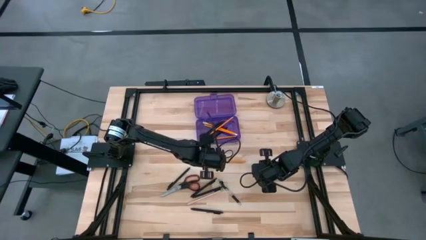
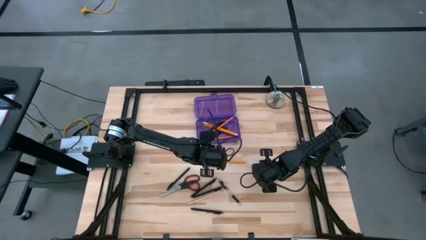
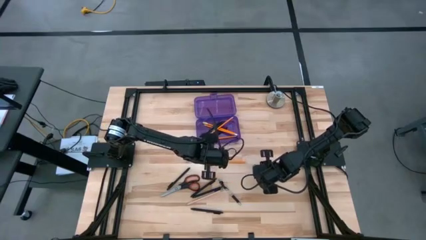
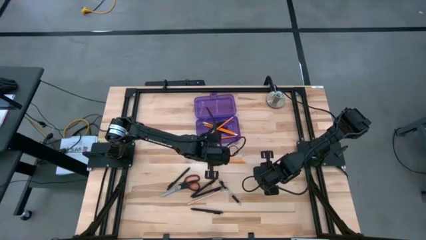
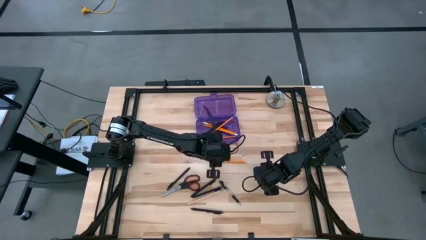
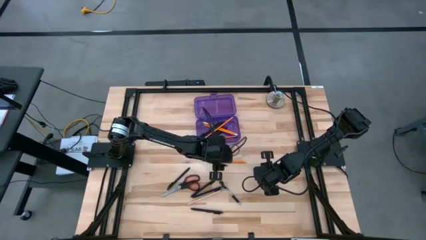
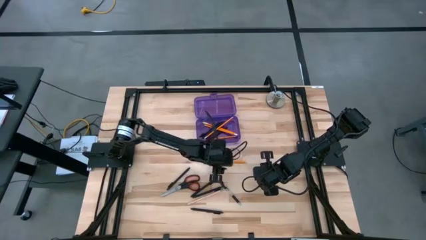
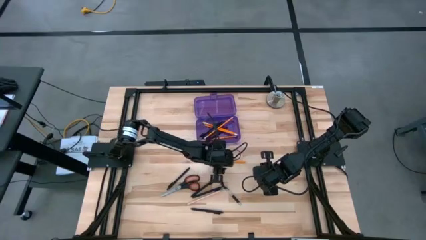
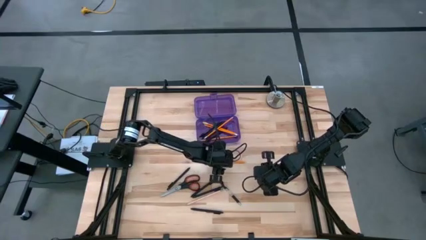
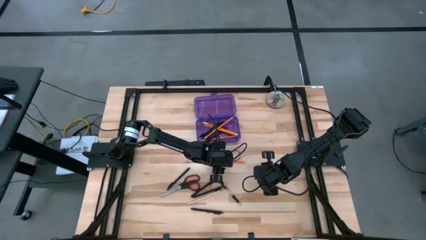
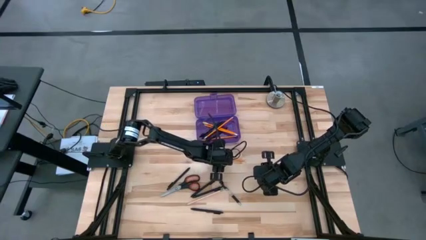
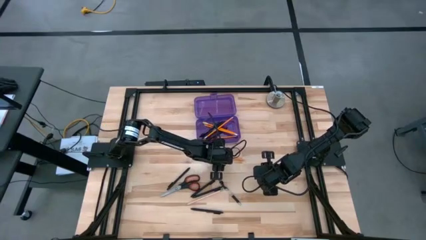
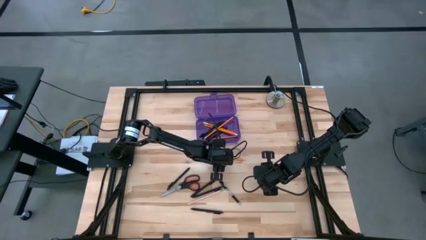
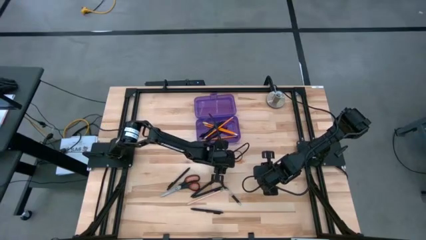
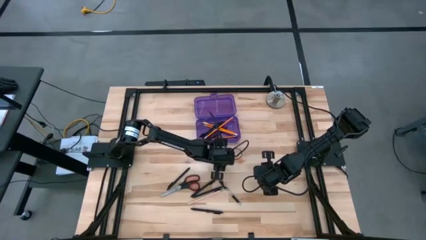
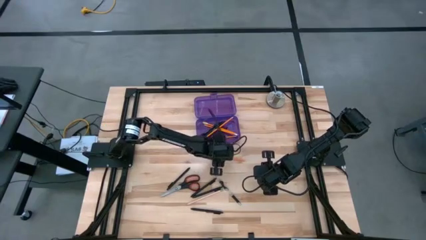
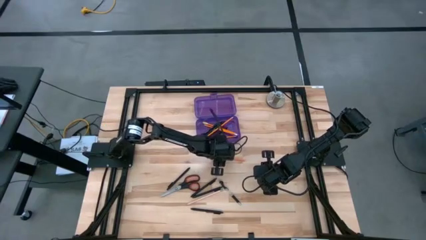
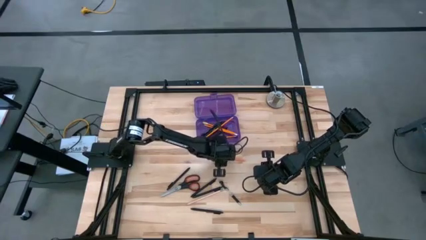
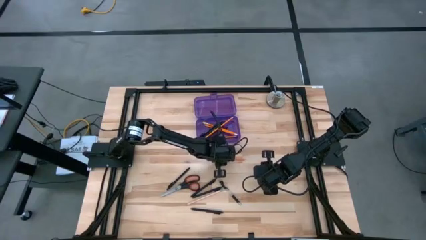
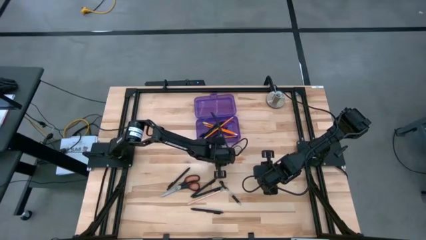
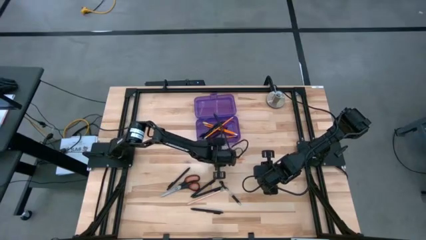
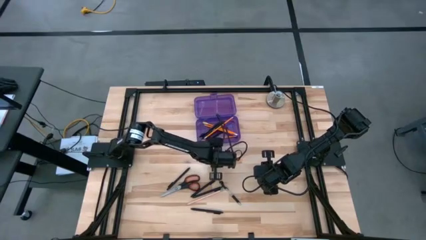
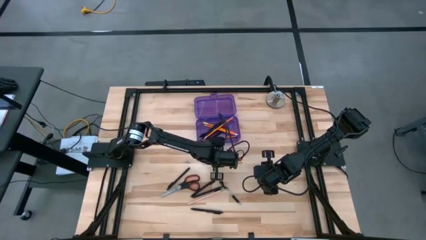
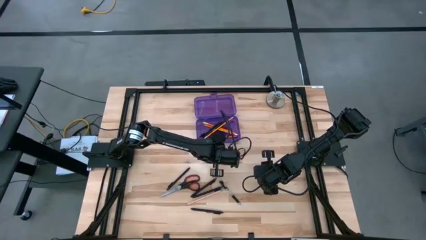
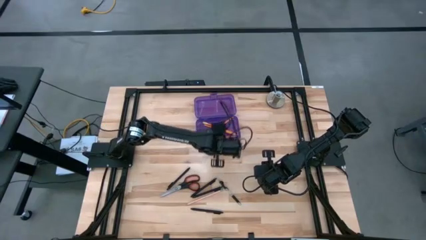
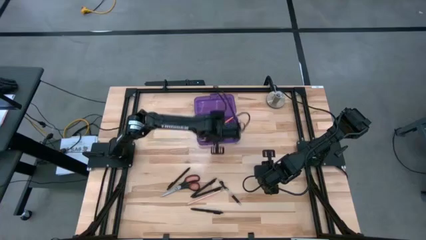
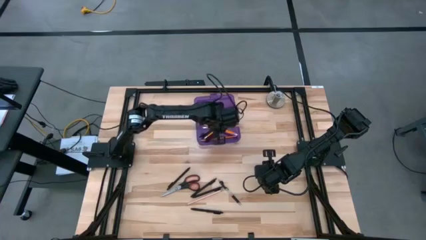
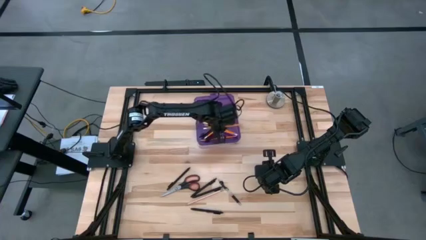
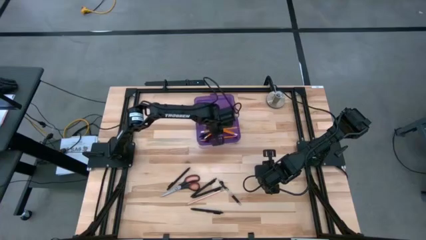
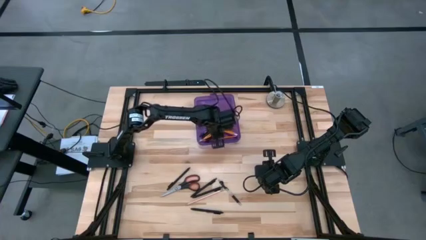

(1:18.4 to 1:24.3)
Task: Pick & place school supplies into a supply box
Put the yellow pencil into the purple supply box

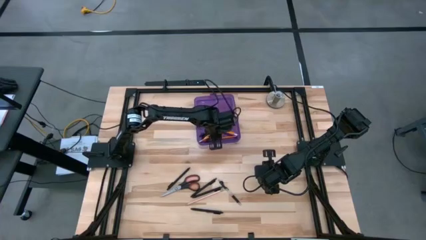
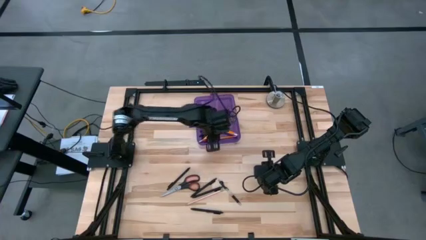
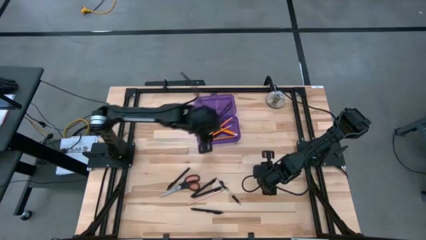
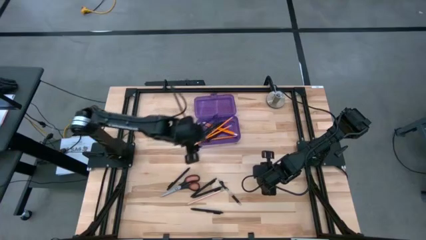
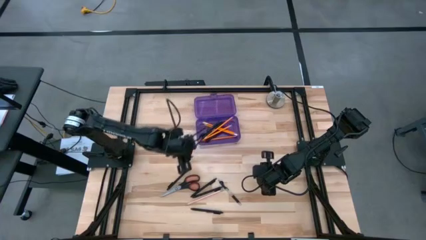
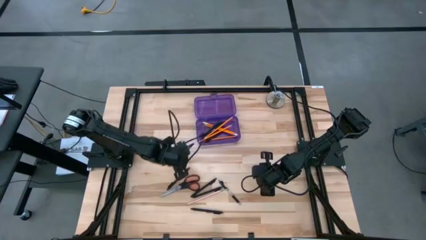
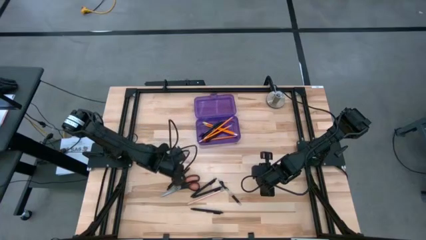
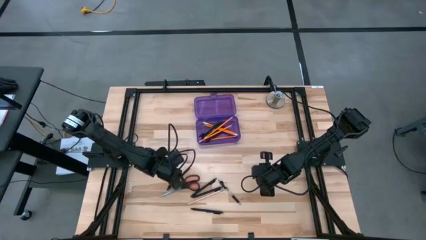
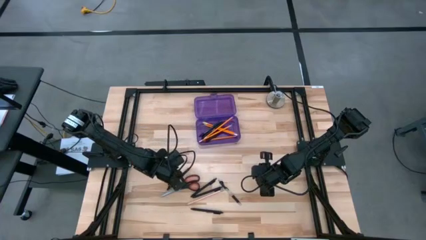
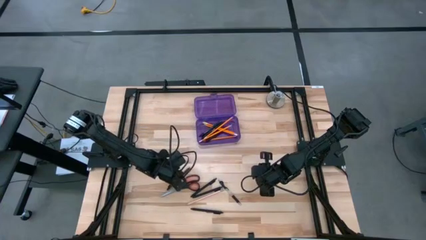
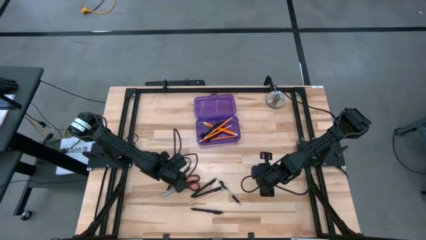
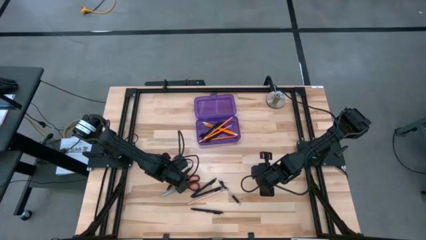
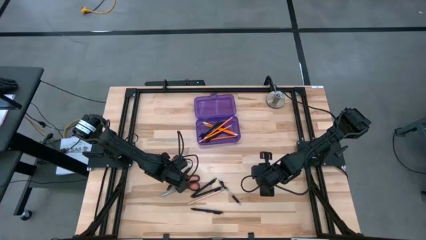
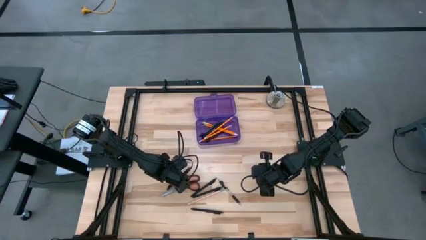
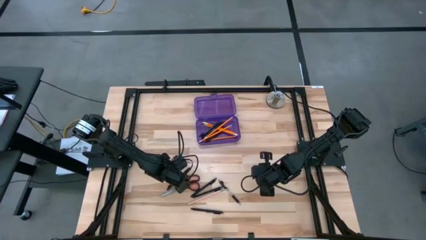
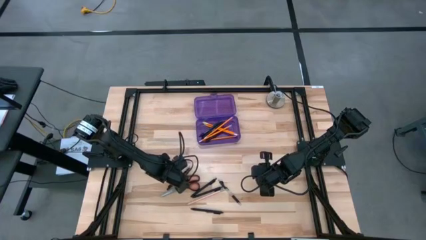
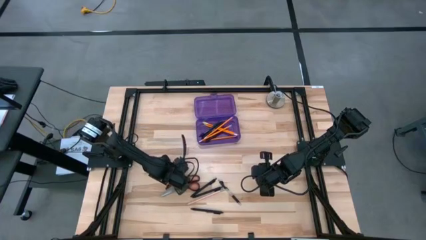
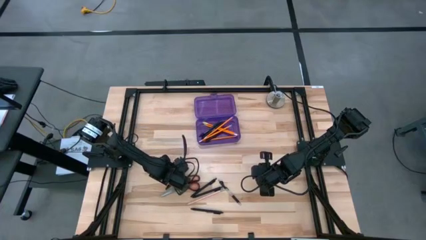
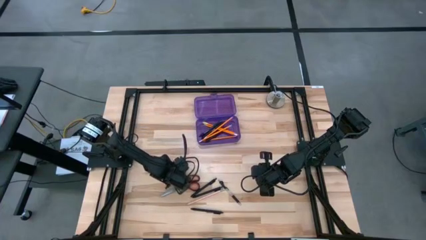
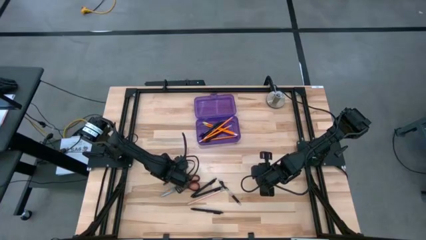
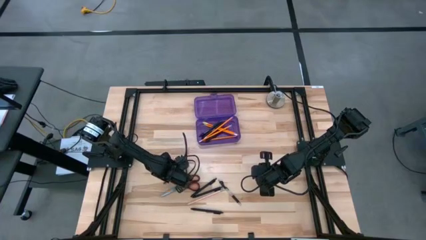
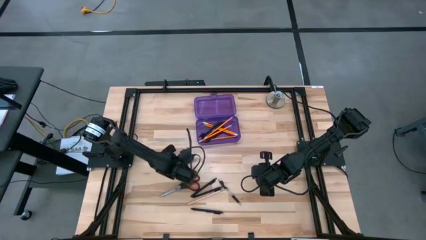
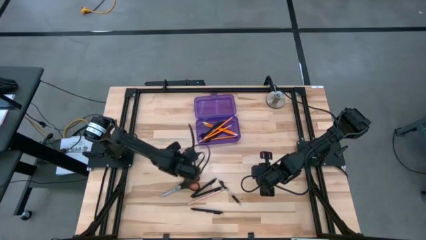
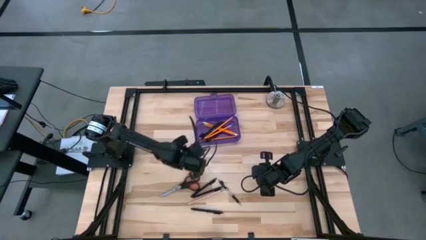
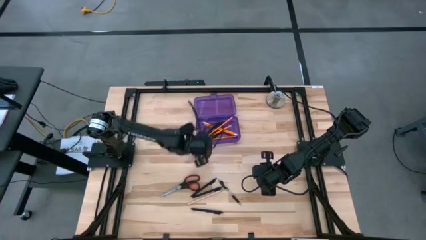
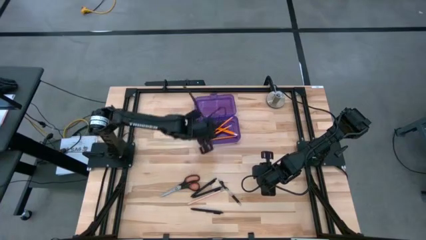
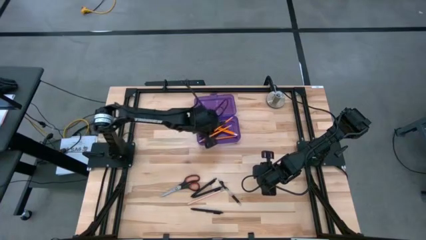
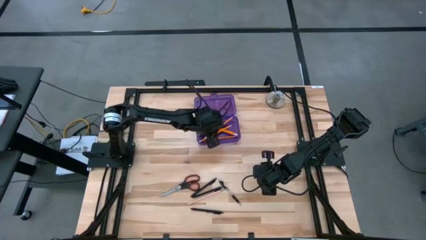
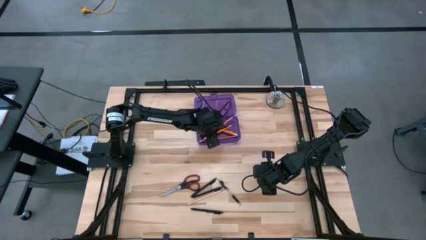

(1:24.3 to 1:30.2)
Put the black pen into the purple supply box

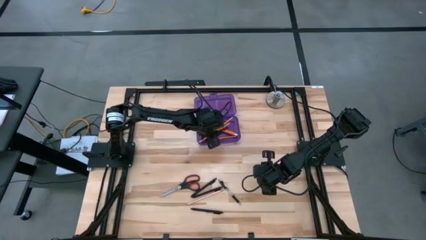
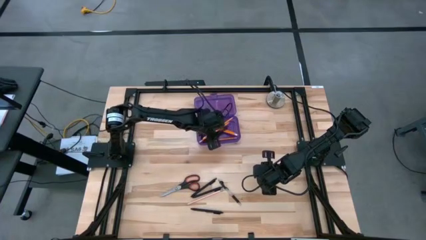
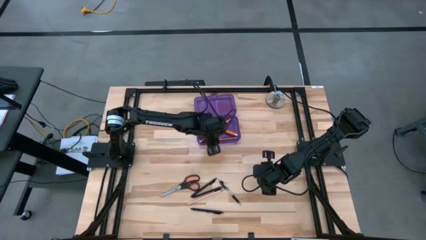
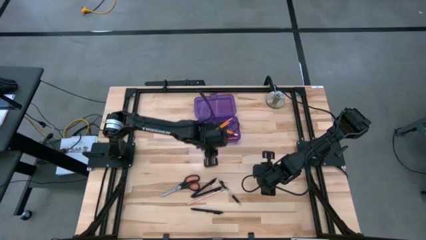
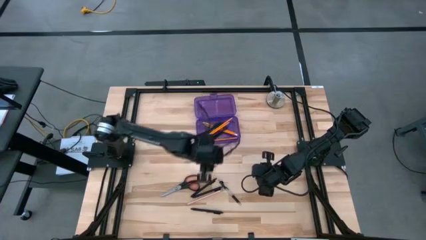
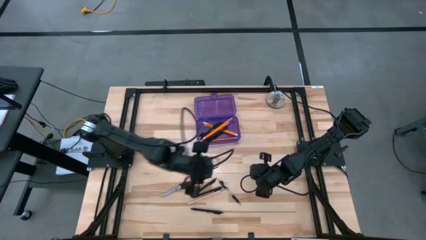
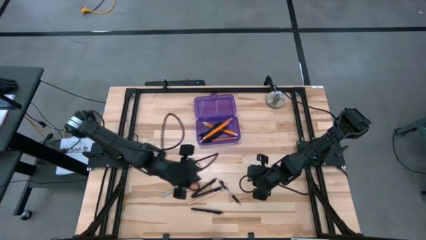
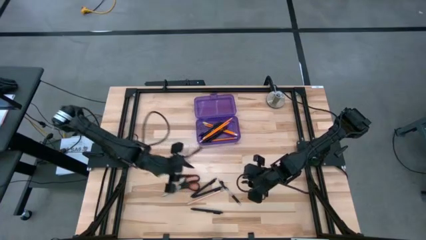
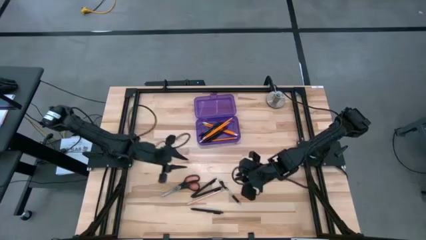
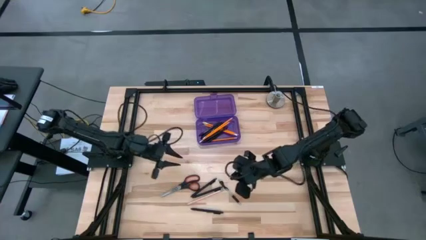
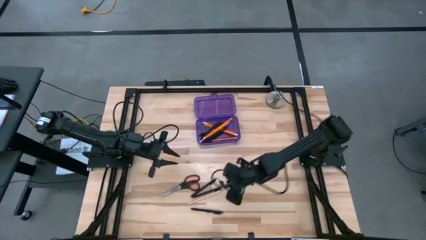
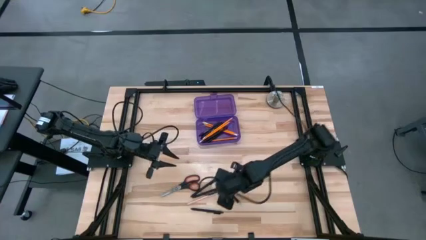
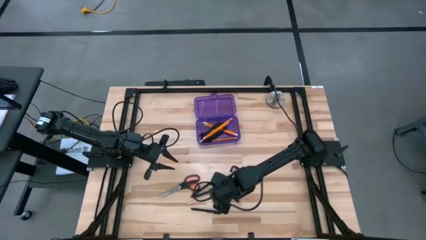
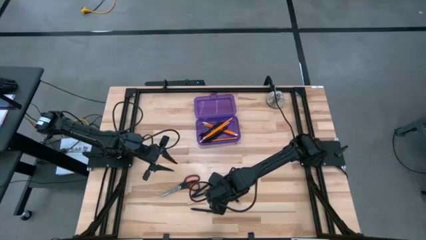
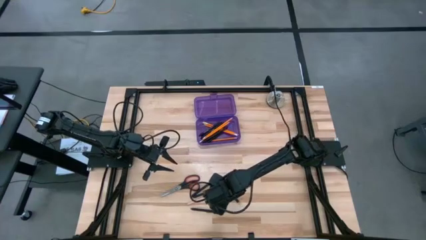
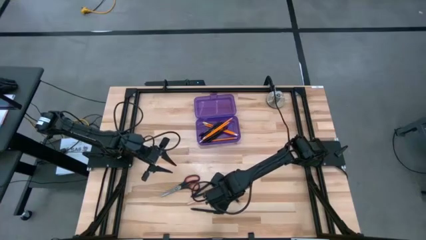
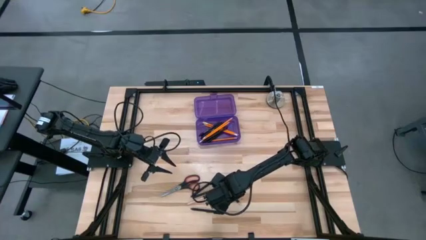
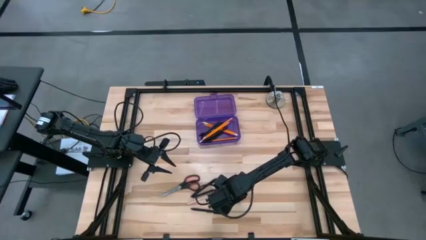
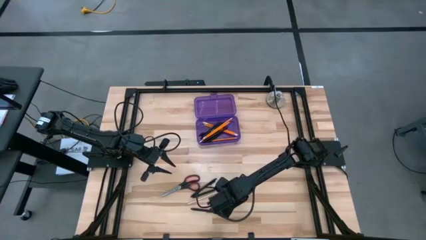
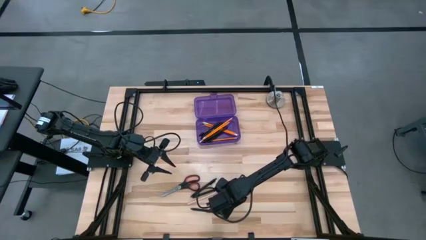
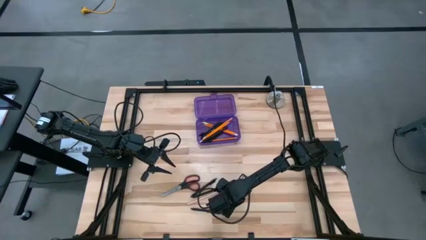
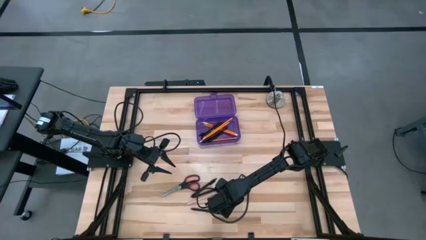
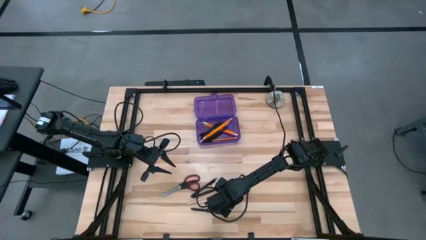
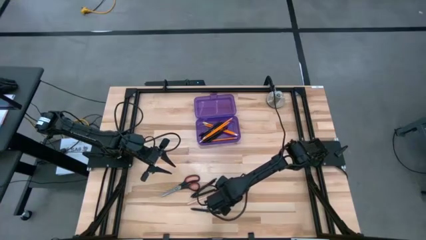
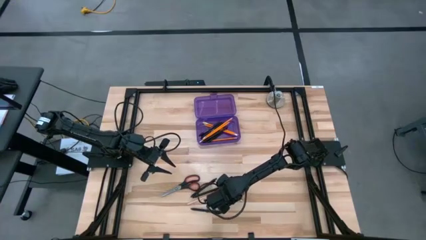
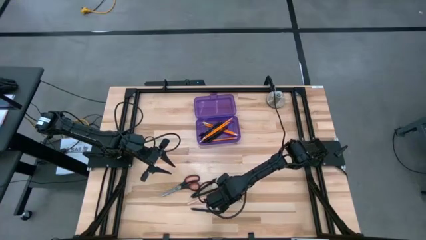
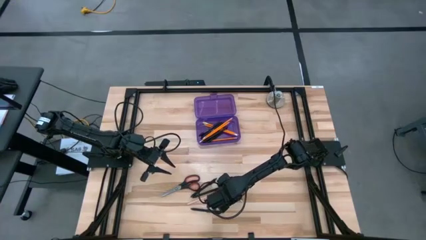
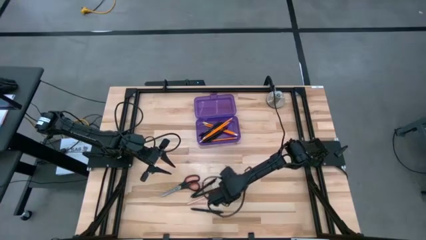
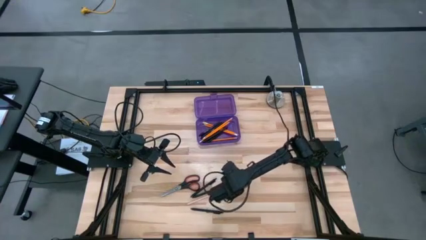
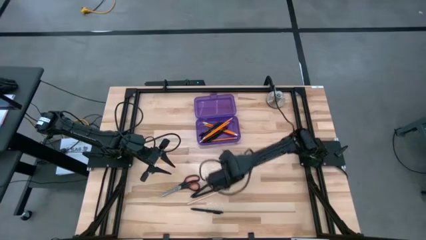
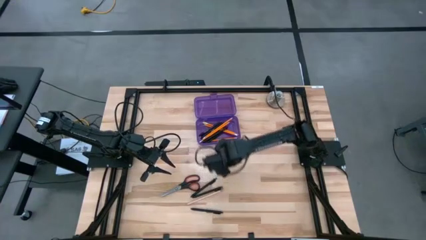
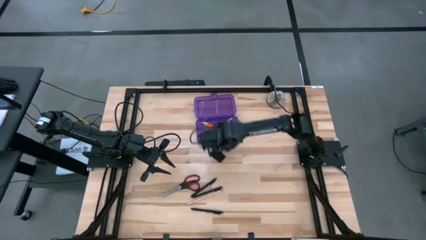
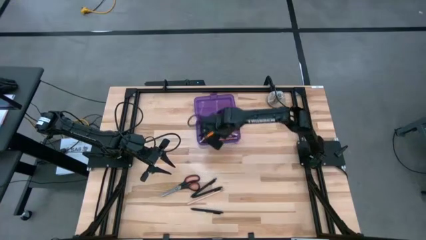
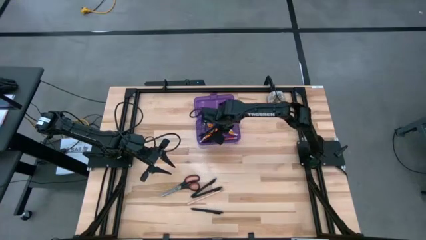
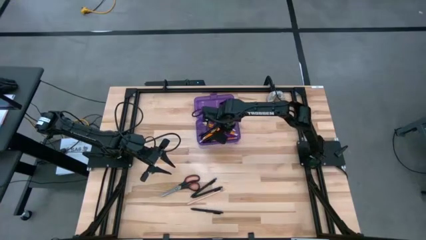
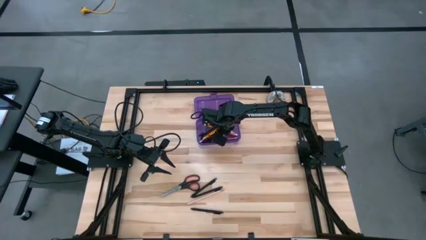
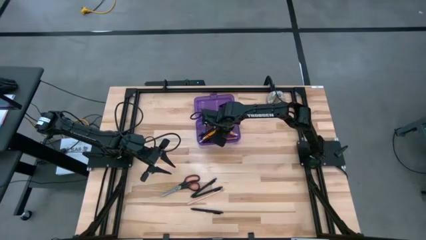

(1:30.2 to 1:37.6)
Put the black pen into the purple supply box
